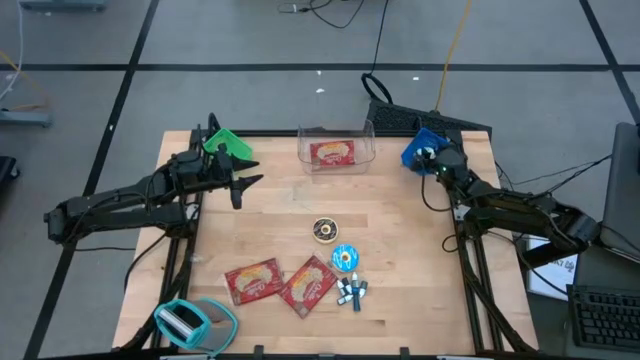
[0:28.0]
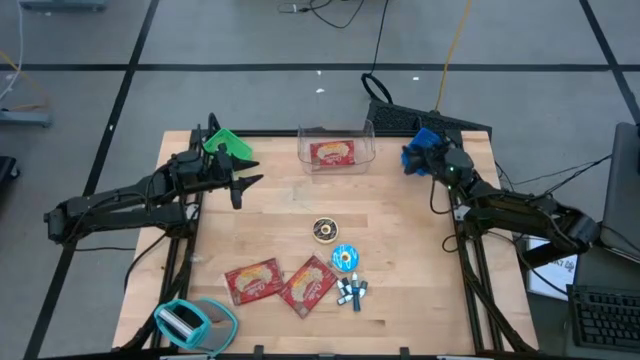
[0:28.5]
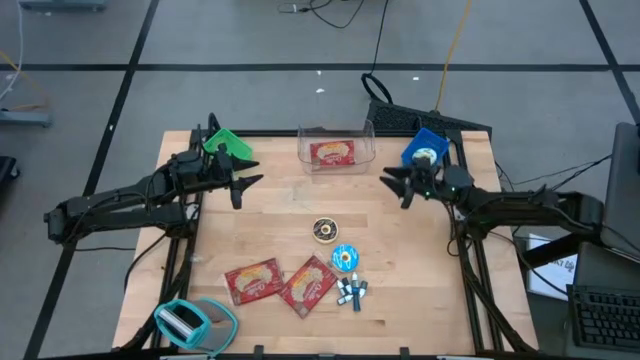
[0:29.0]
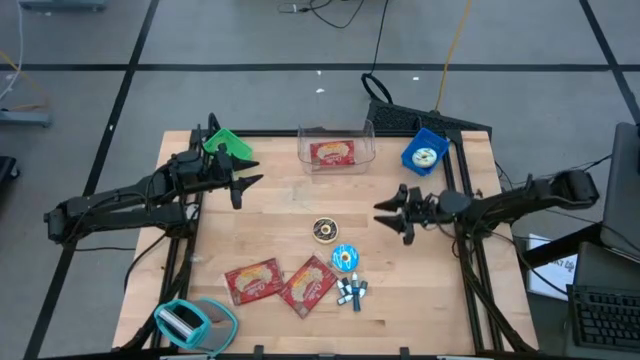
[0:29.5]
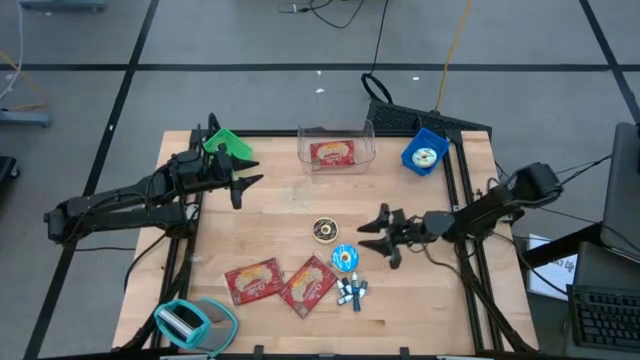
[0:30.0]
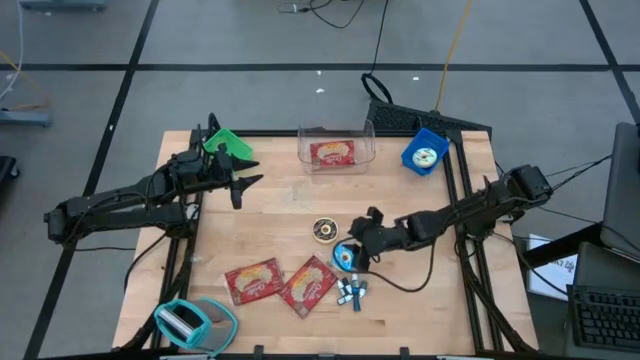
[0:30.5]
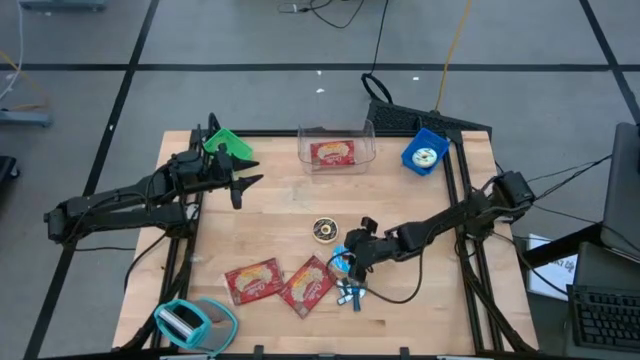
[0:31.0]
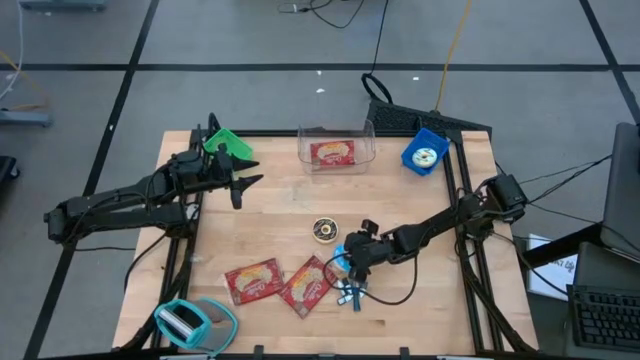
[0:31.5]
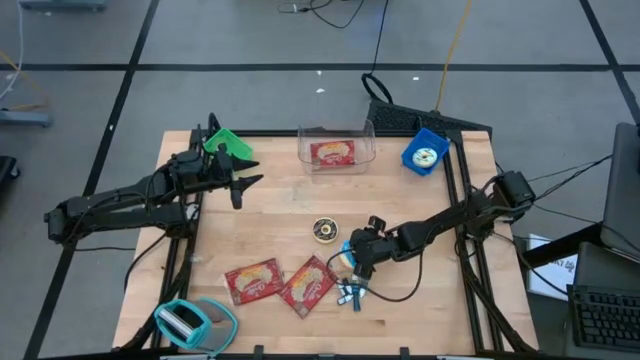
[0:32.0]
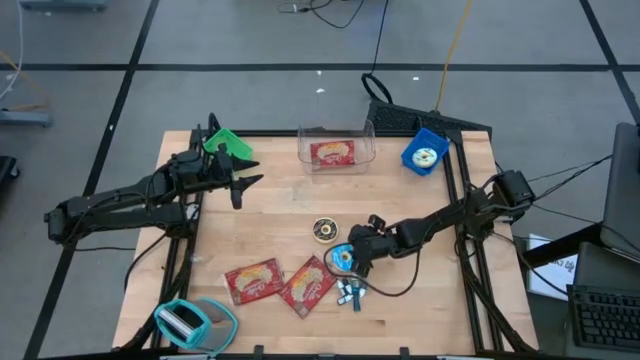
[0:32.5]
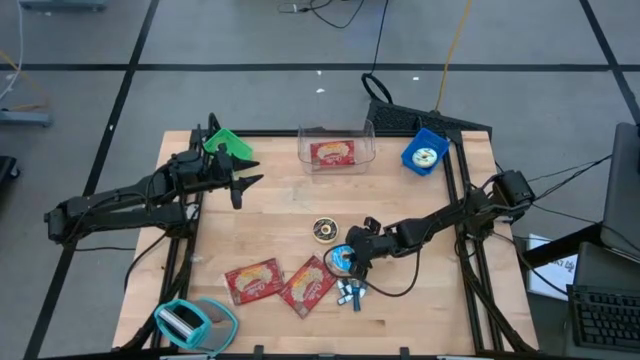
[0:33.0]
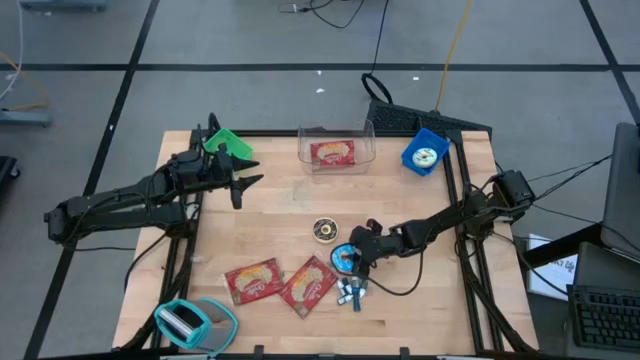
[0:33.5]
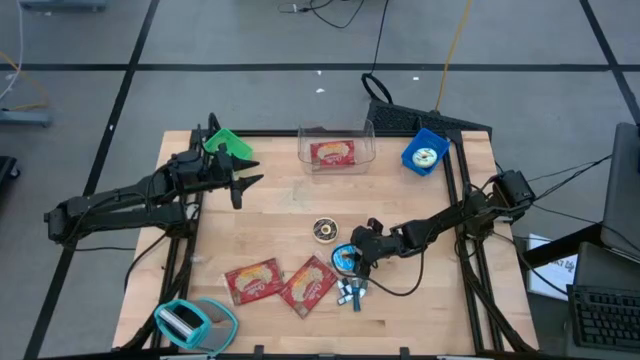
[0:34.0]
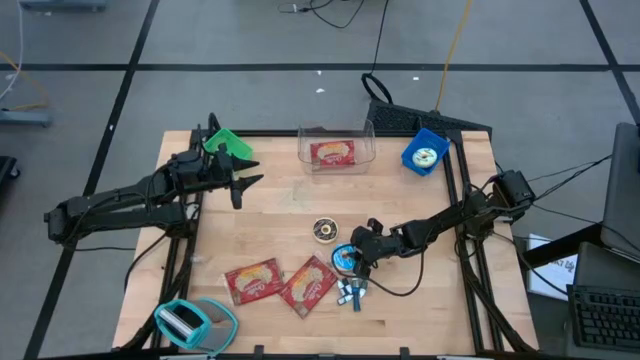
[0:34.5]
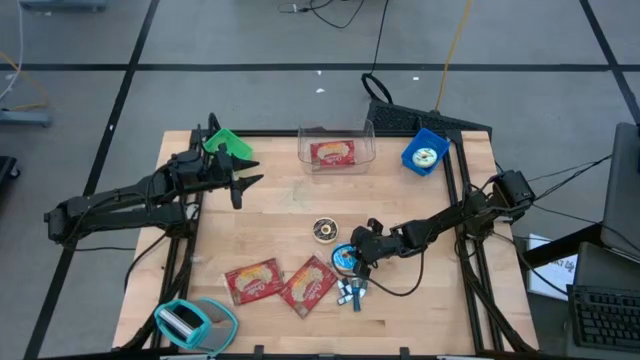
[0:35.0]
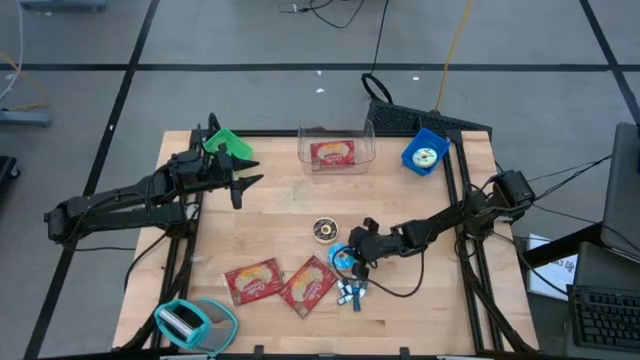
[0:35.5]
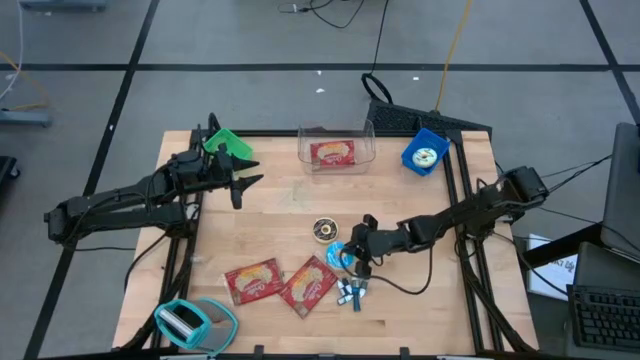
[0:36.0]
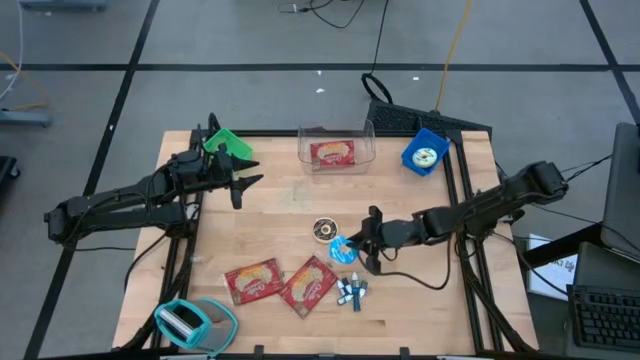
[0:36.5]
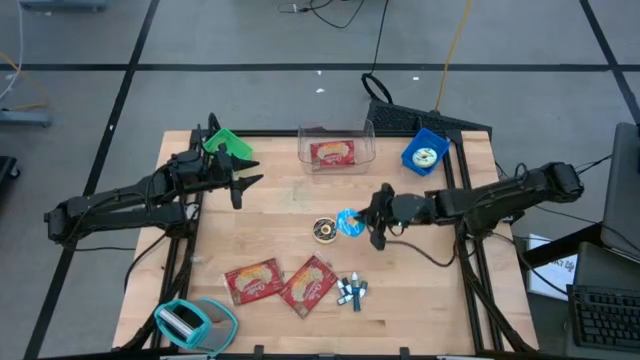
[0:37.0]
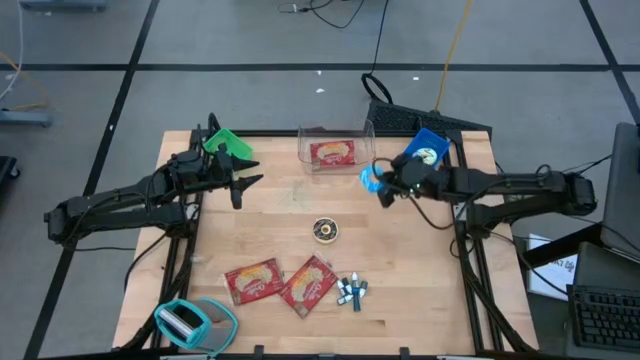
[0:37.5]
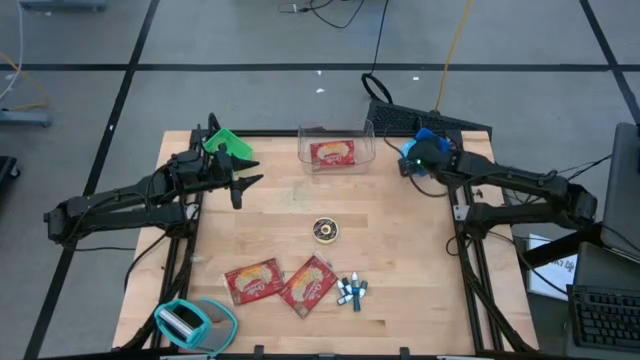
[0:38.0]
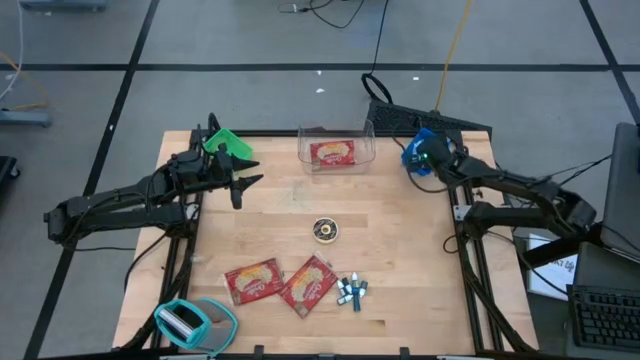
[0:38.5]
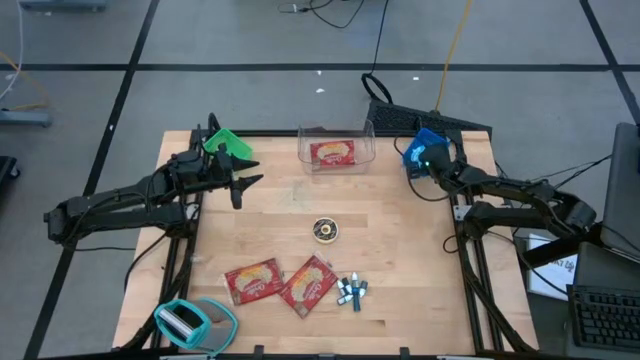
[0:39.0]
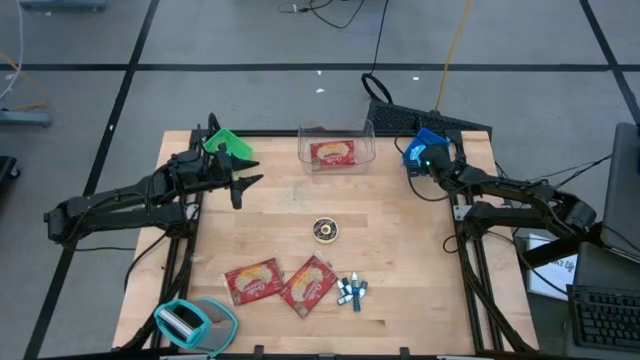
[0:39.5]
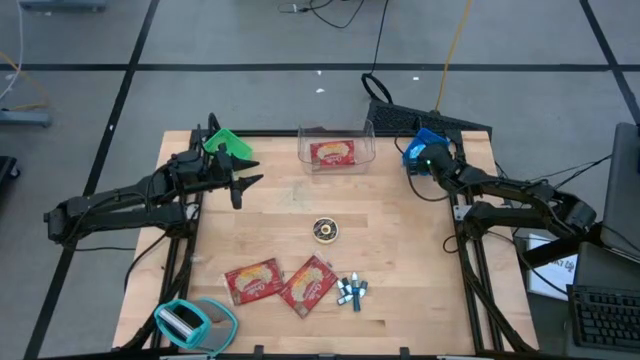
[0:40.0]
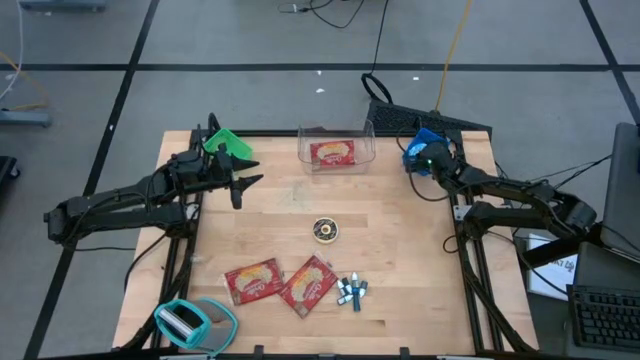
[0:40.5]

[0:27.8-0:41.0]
Put the blue donut into the blue bin
